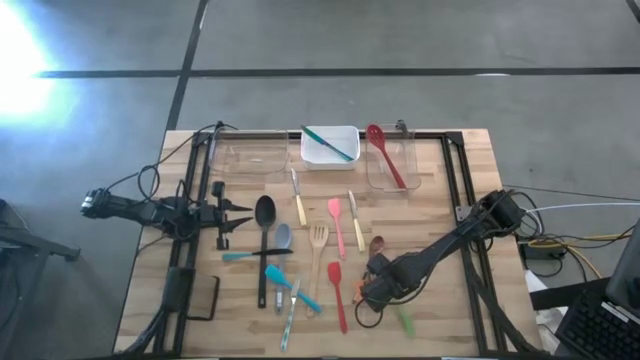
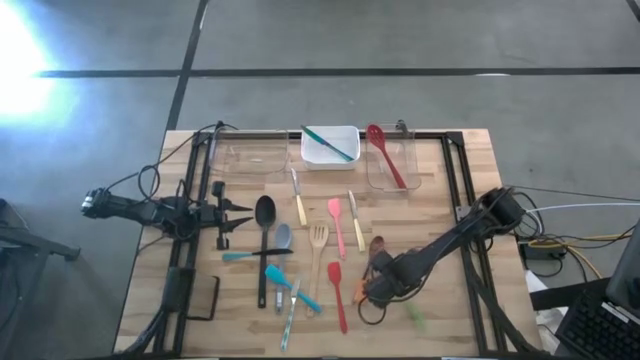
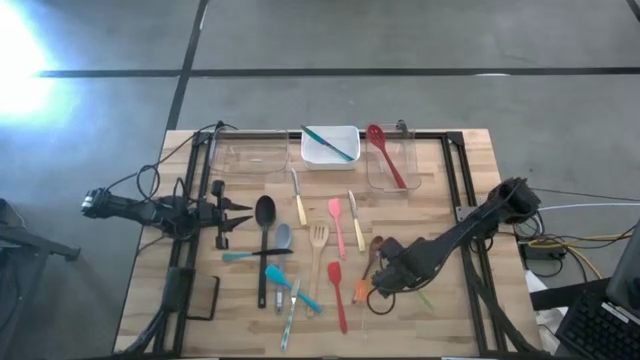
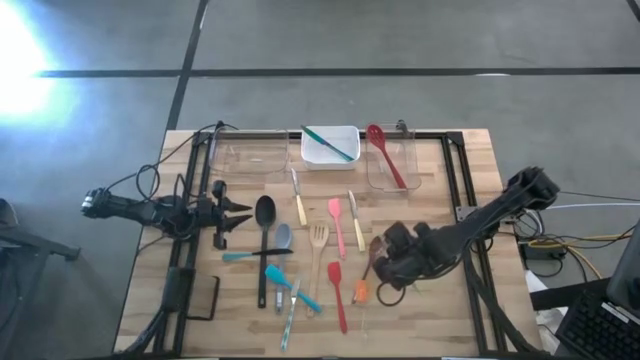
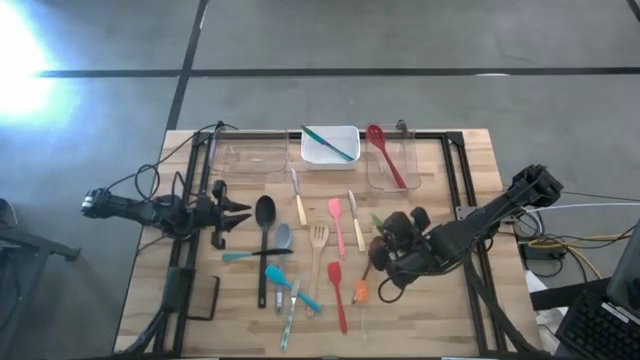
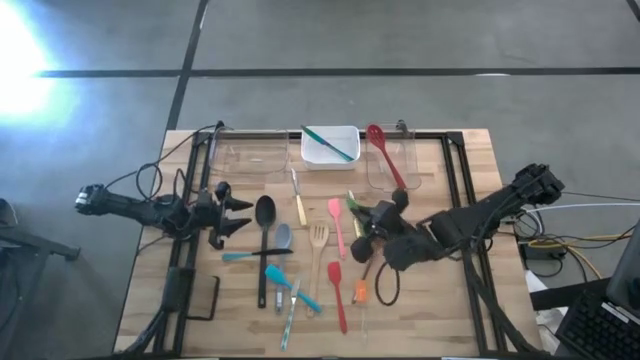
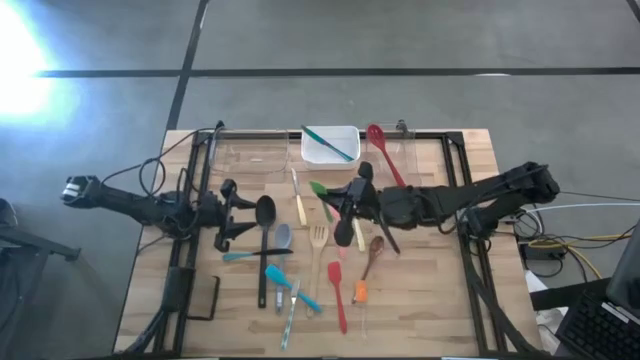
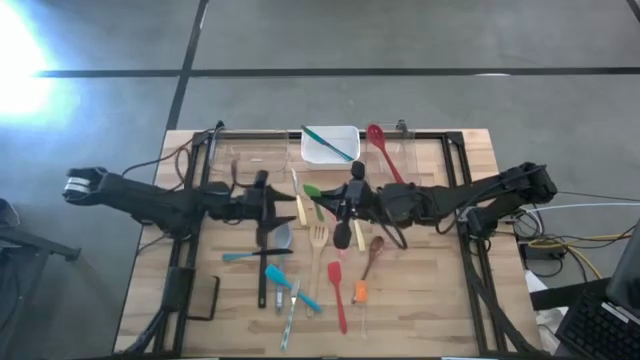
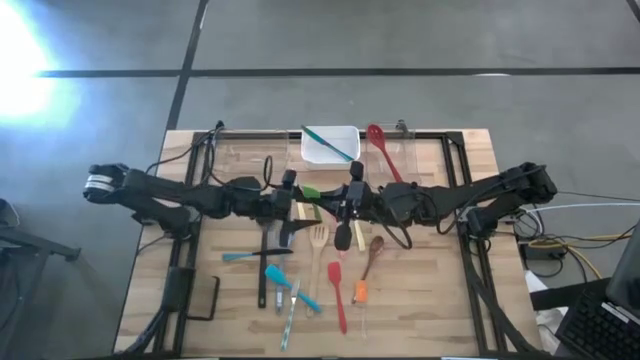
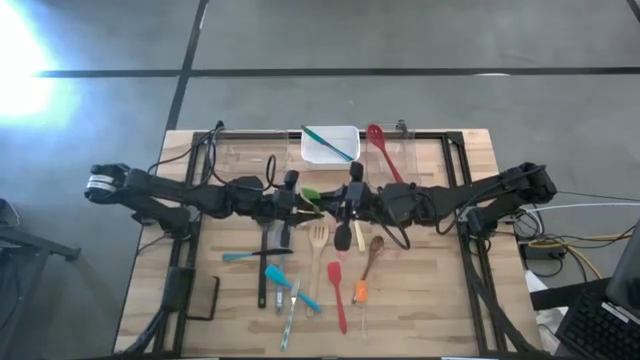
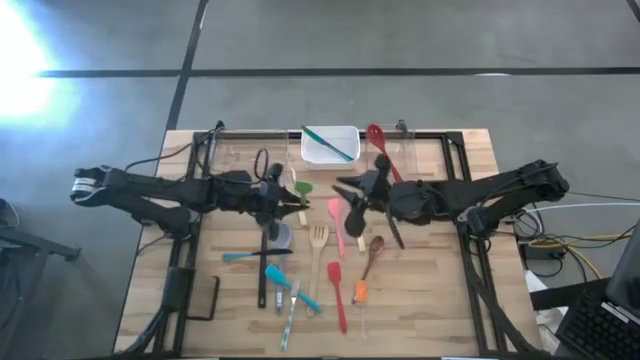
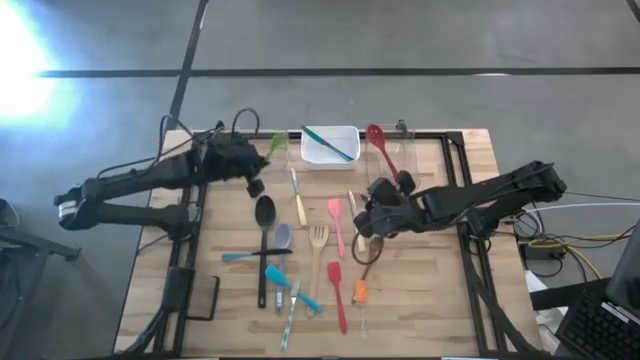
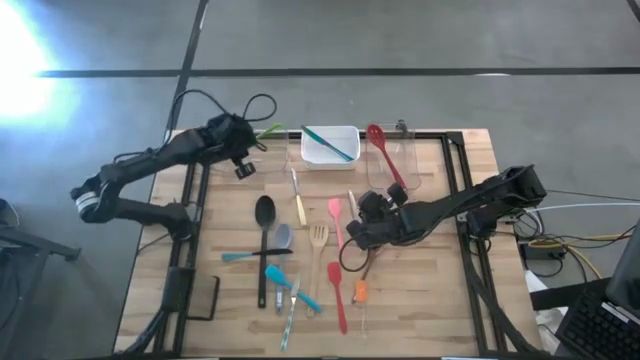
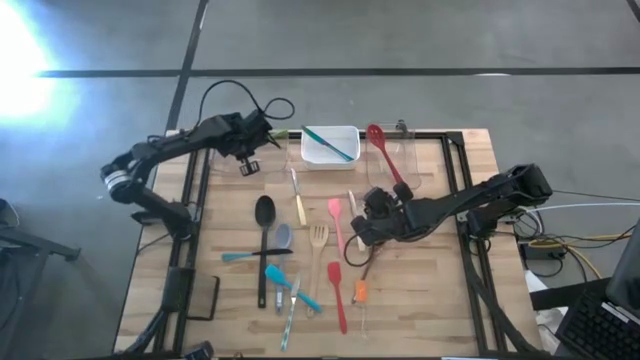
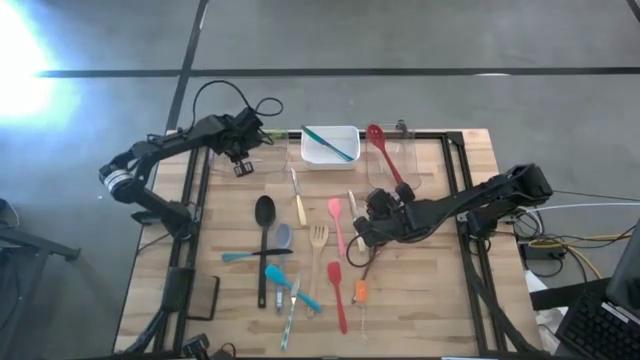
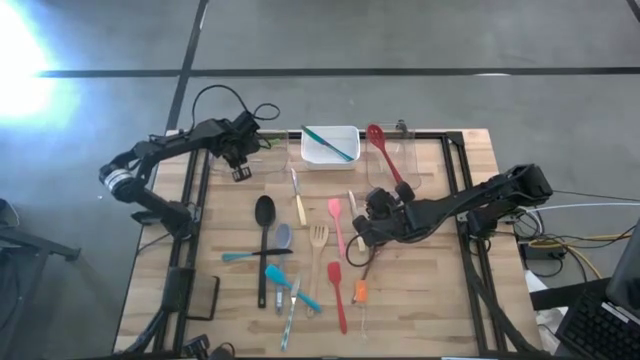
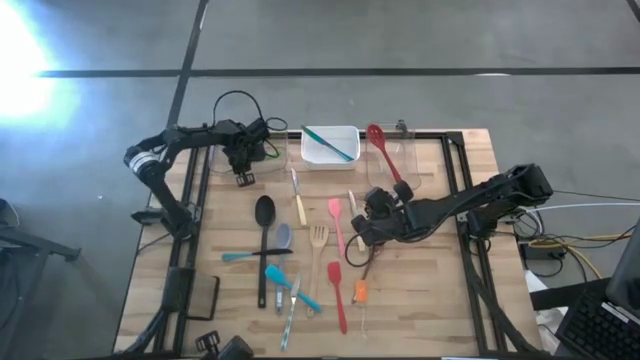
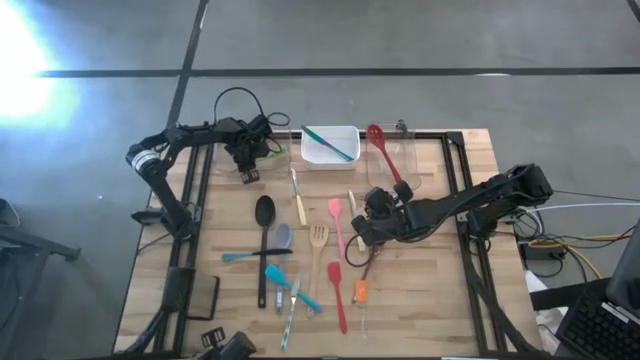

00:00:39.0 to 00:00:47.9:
Task: Pick & Place Kitchen Items
Put the green spatula into the left transparent bin

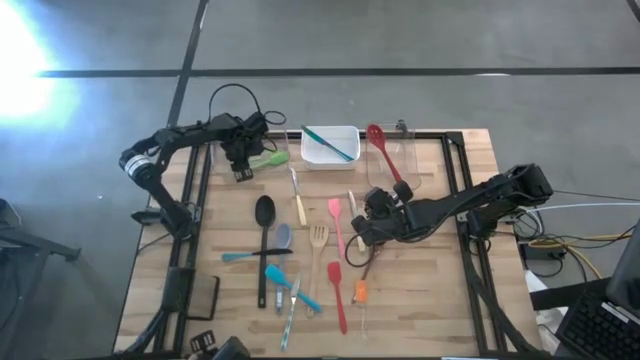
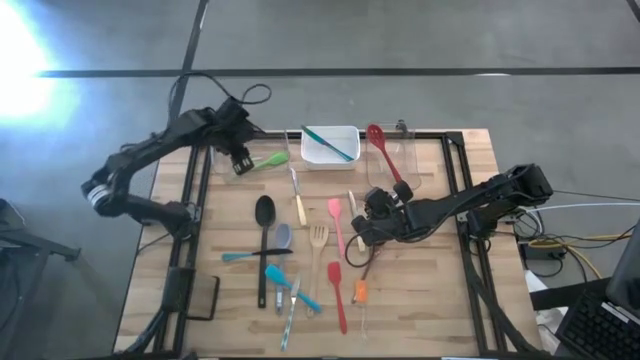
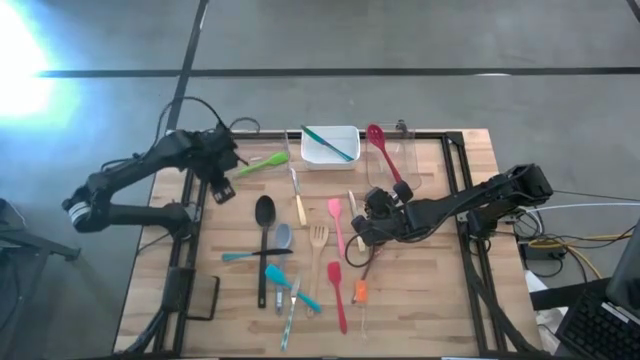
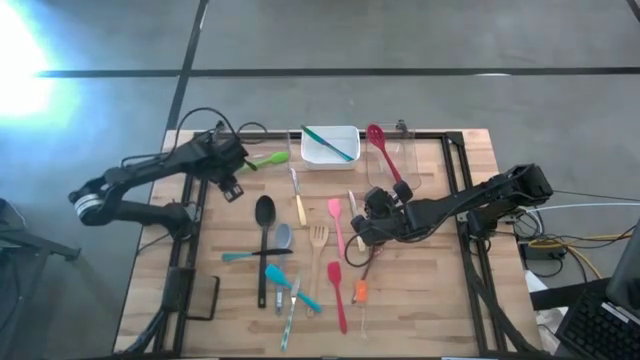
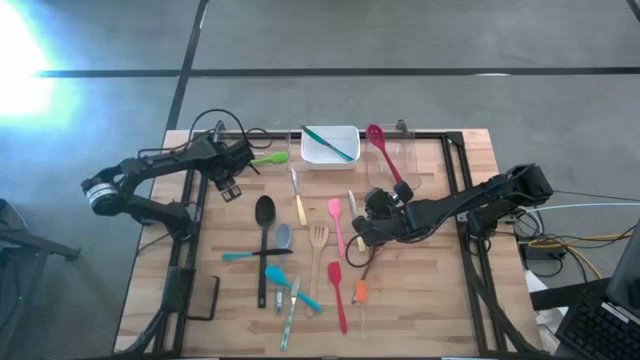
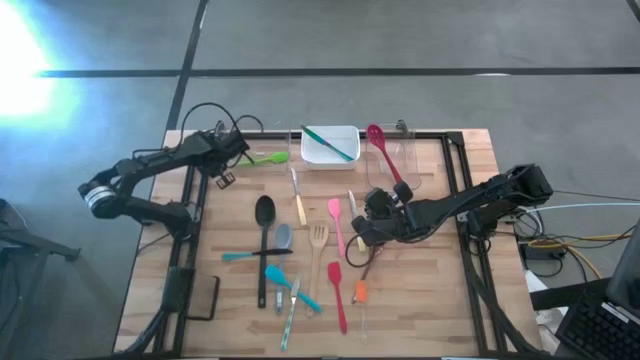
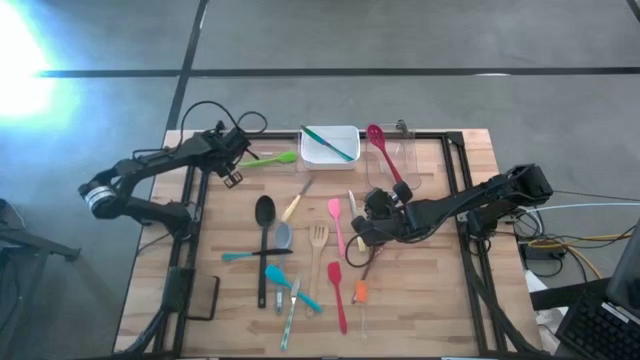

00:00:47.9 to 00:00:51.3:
Adjust the left transparent bin on the table

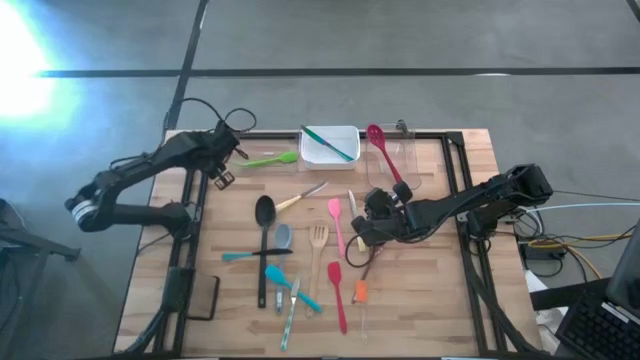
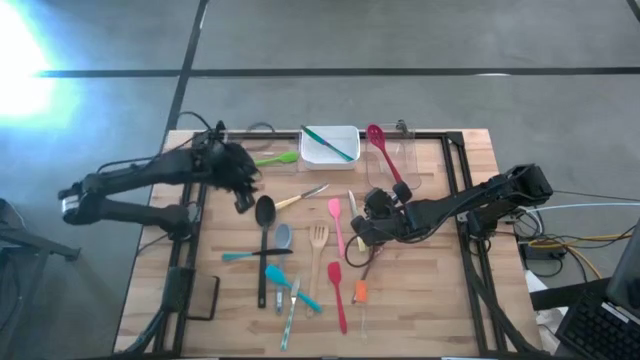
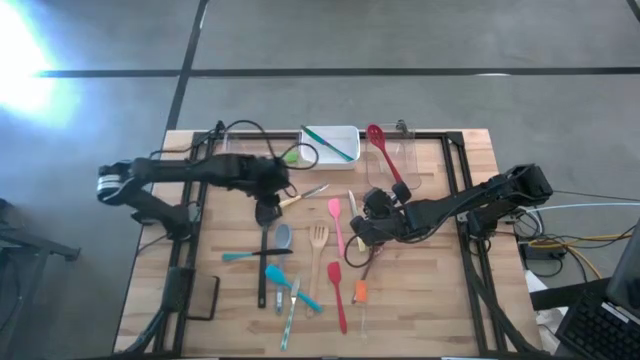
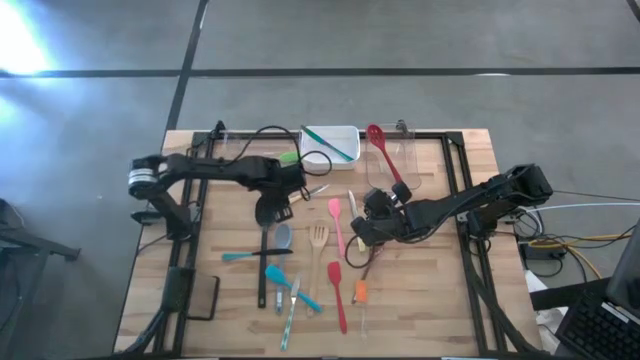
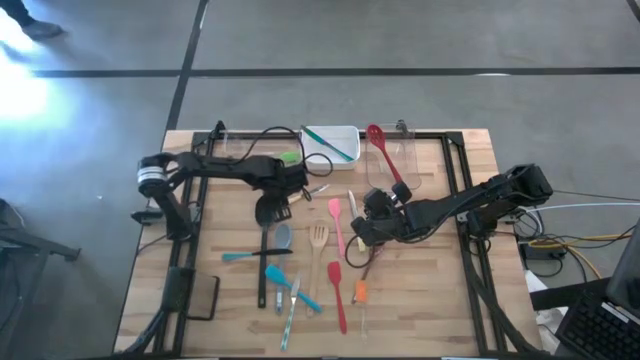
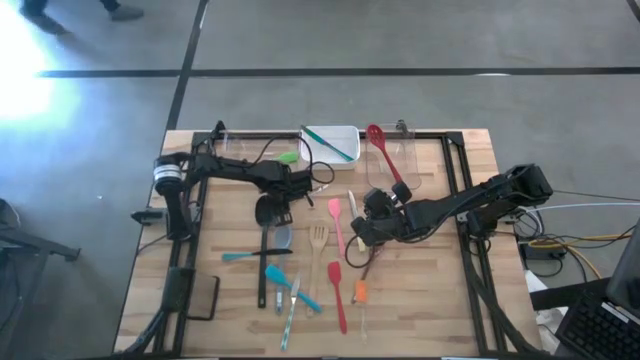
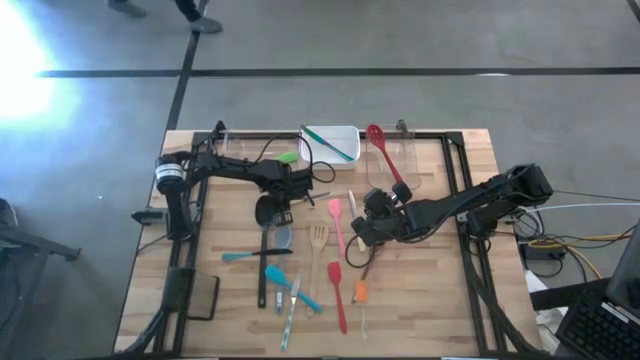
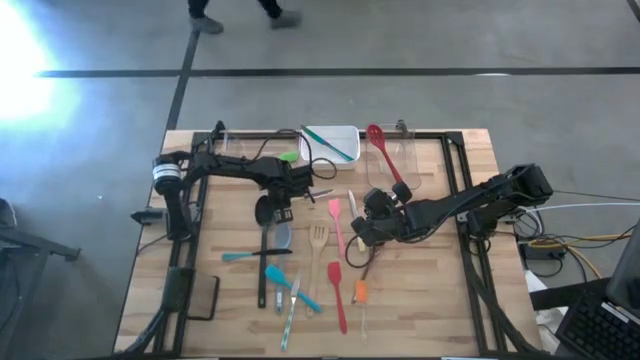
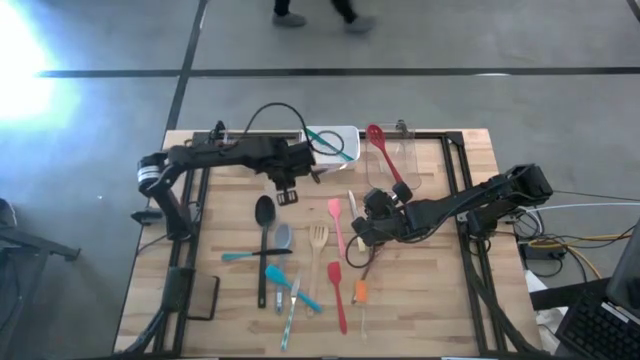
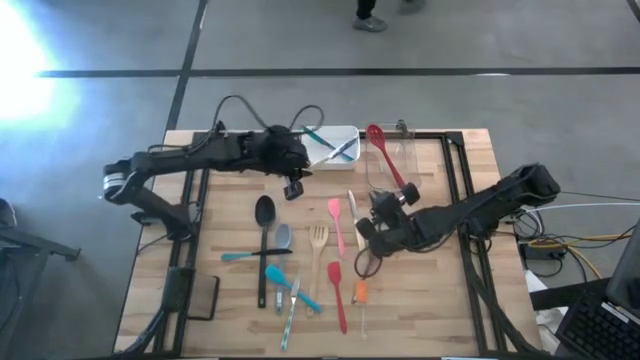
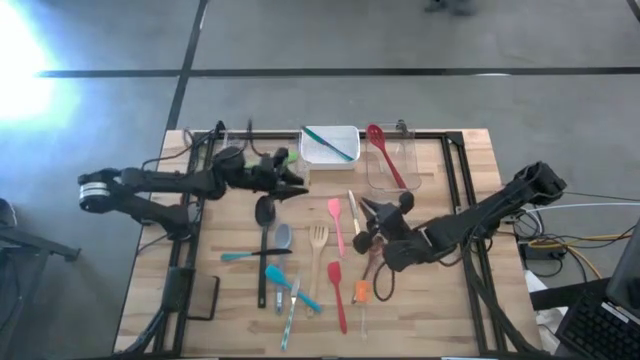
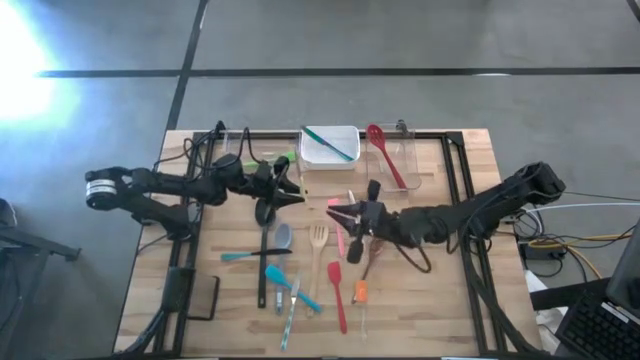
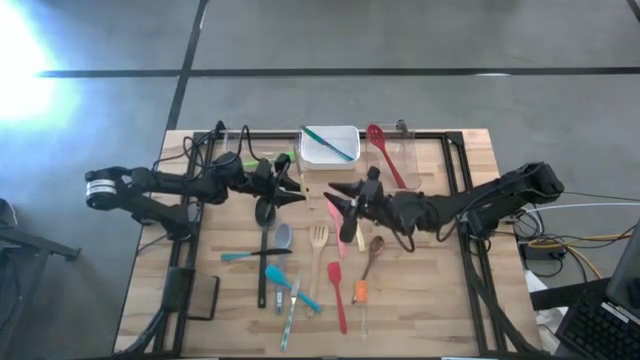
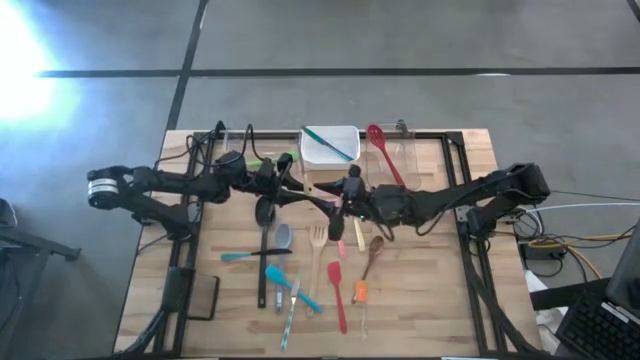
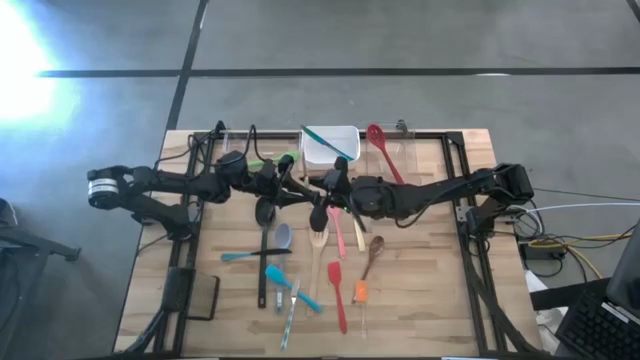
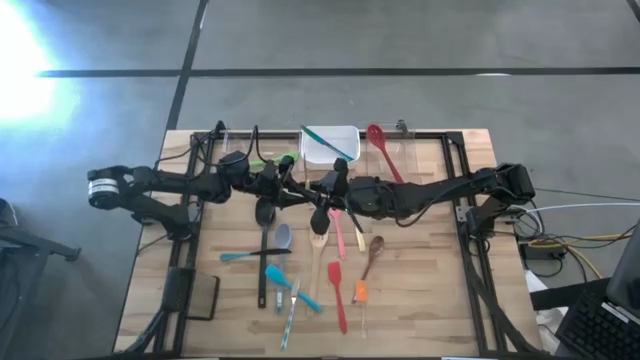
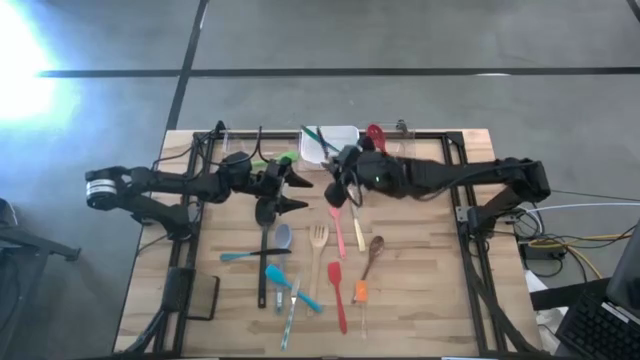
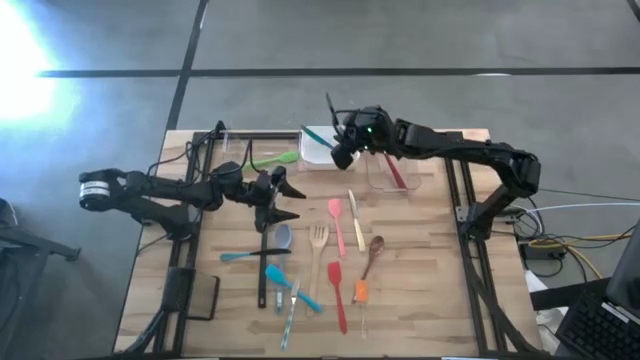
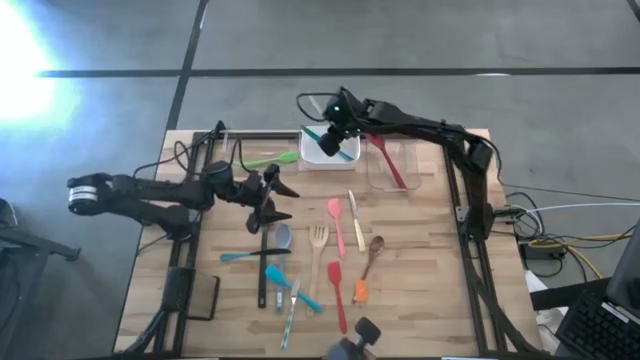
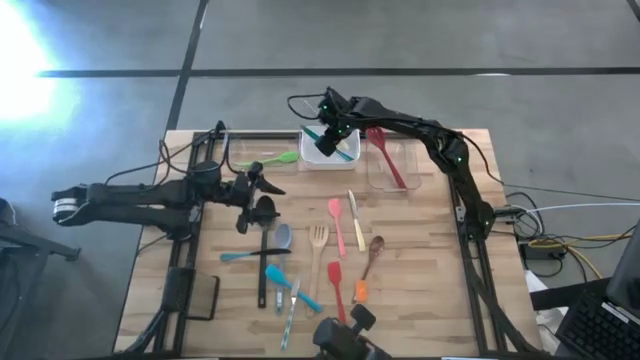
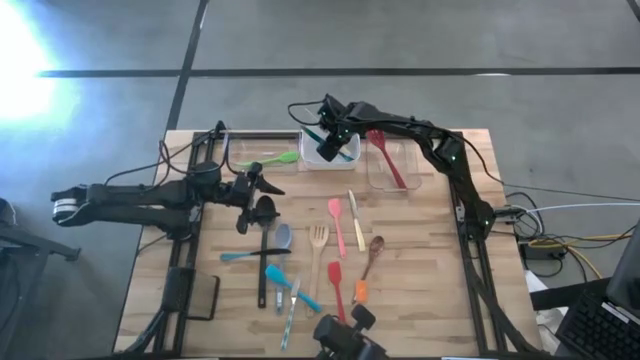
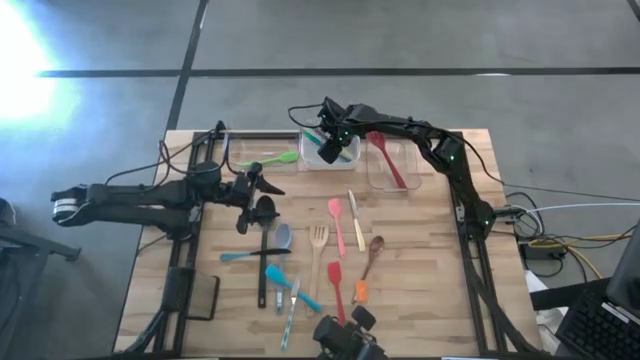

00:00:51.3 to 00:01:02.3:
Put the white knife into the white bin
